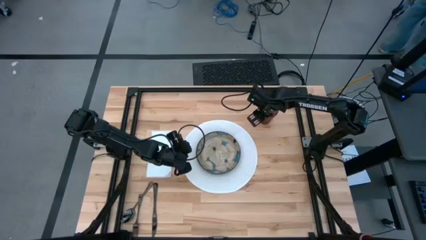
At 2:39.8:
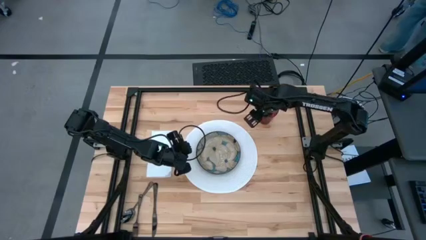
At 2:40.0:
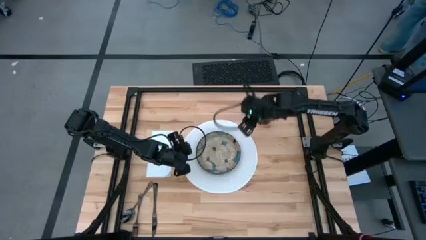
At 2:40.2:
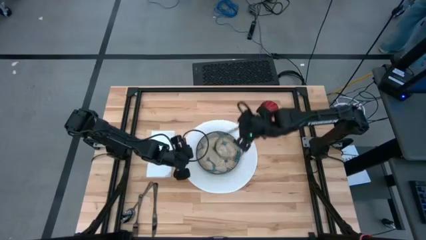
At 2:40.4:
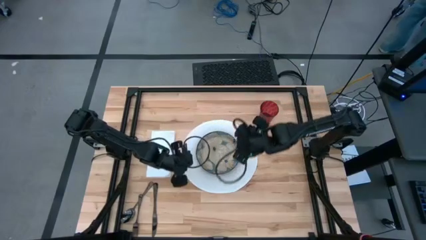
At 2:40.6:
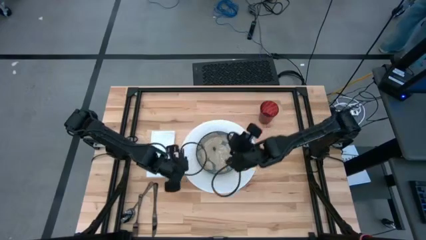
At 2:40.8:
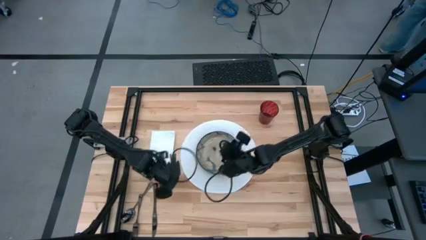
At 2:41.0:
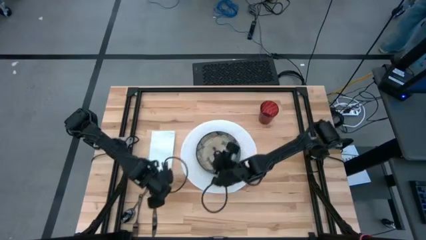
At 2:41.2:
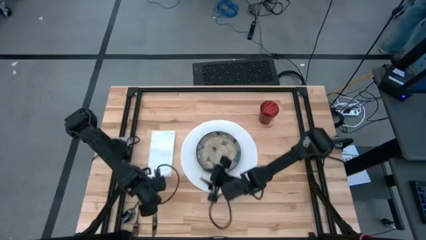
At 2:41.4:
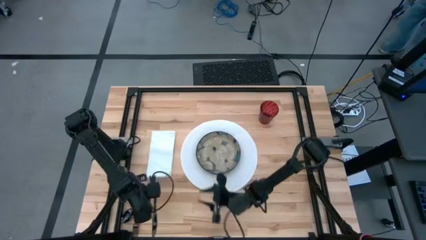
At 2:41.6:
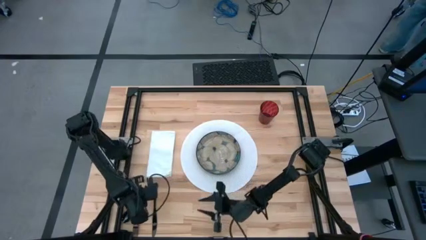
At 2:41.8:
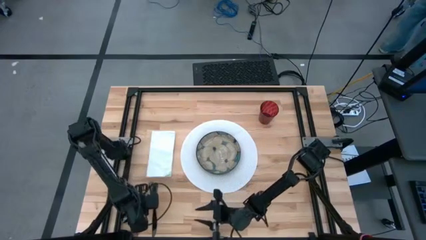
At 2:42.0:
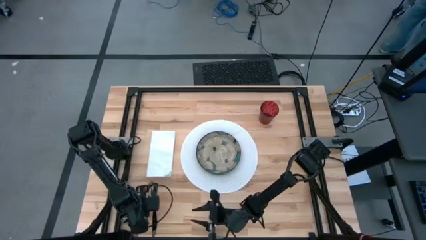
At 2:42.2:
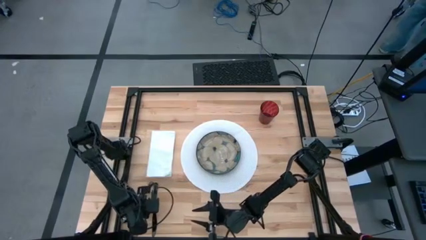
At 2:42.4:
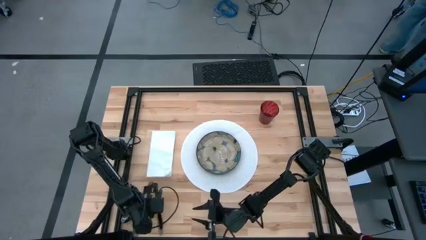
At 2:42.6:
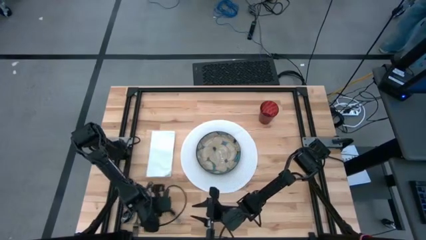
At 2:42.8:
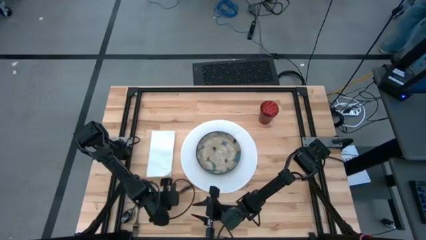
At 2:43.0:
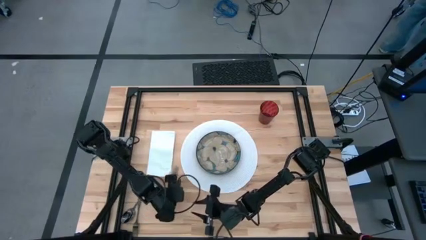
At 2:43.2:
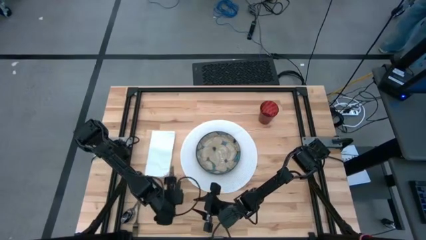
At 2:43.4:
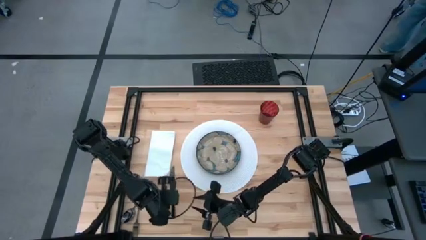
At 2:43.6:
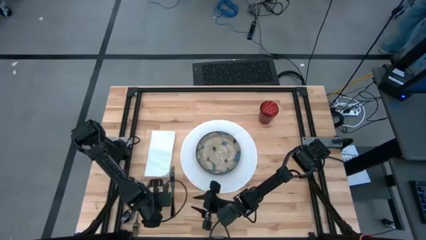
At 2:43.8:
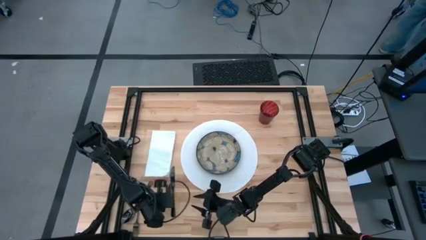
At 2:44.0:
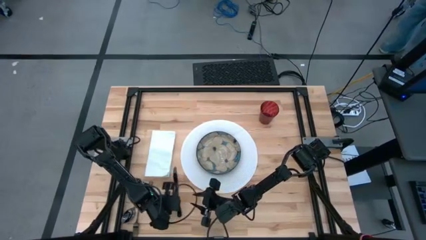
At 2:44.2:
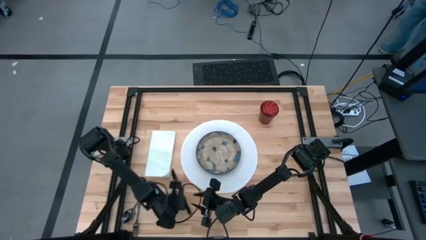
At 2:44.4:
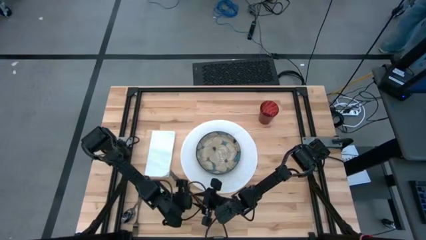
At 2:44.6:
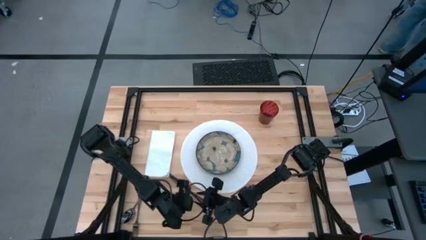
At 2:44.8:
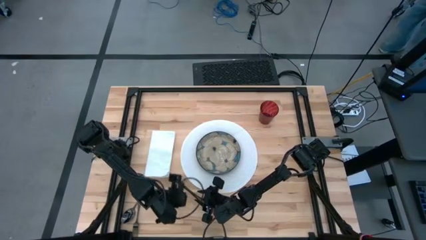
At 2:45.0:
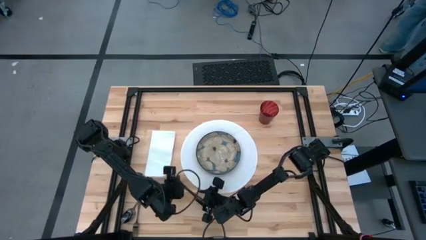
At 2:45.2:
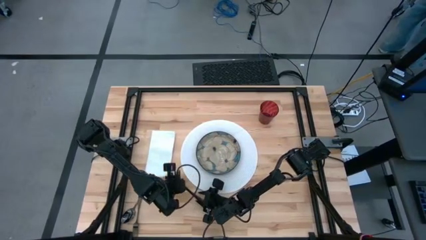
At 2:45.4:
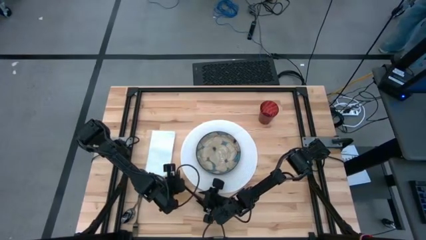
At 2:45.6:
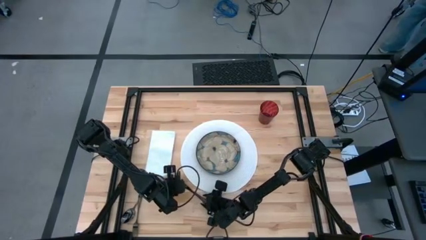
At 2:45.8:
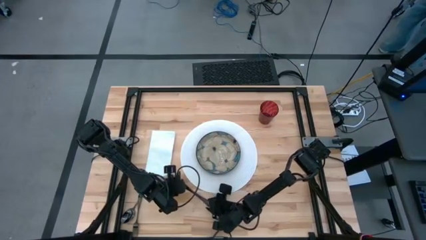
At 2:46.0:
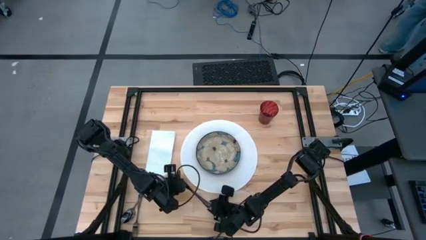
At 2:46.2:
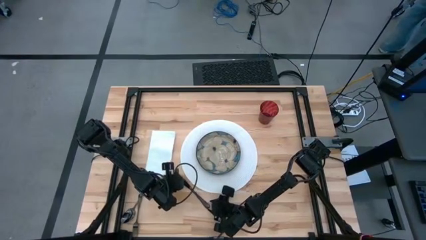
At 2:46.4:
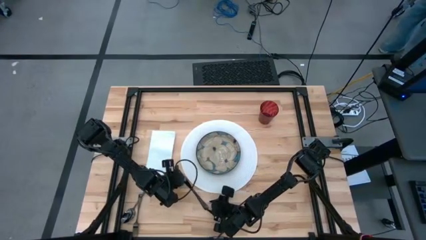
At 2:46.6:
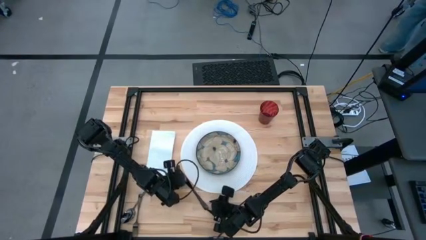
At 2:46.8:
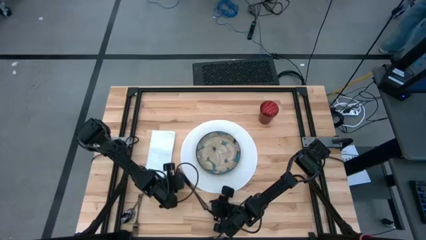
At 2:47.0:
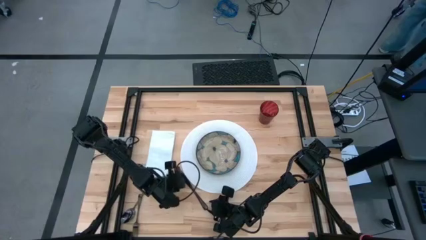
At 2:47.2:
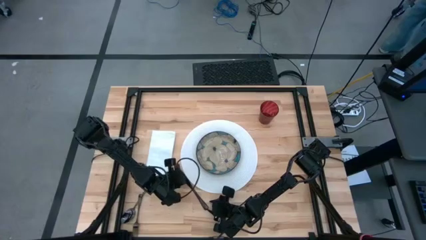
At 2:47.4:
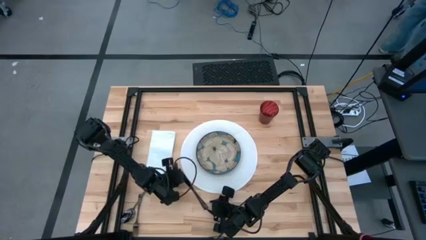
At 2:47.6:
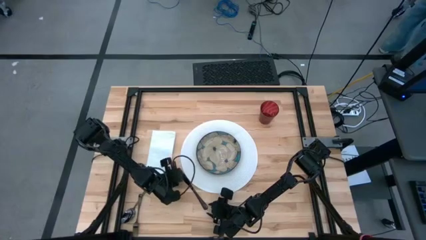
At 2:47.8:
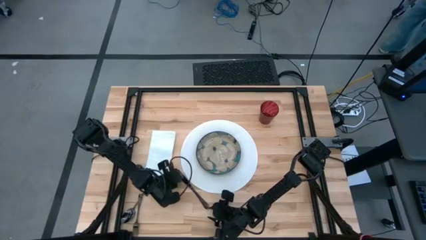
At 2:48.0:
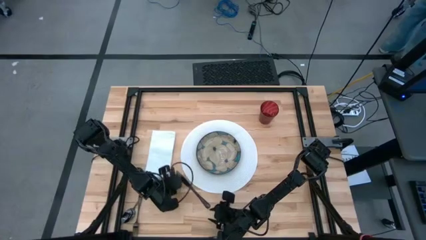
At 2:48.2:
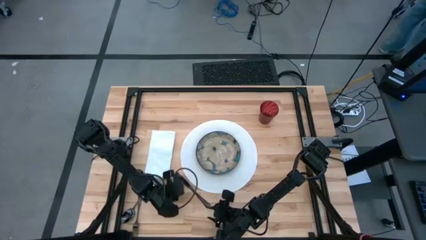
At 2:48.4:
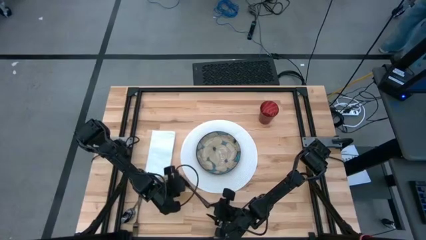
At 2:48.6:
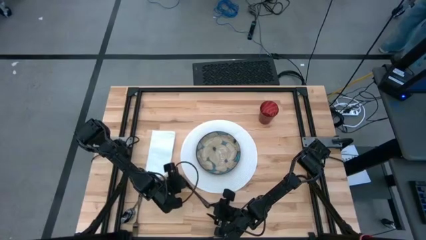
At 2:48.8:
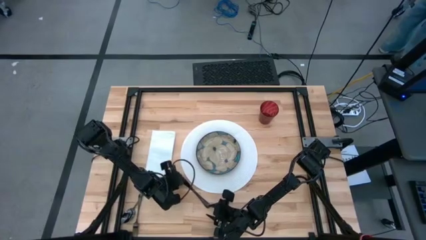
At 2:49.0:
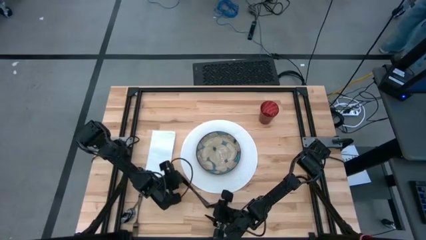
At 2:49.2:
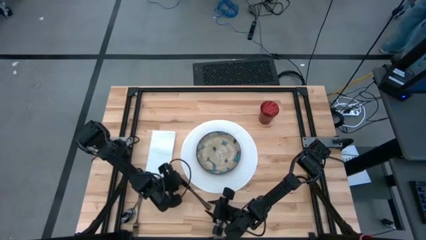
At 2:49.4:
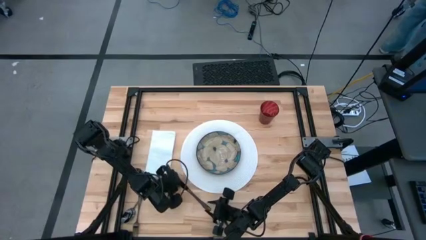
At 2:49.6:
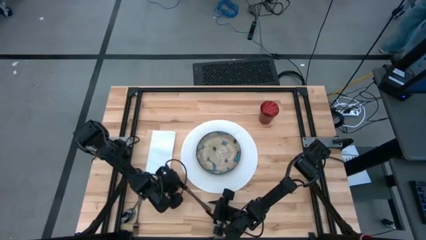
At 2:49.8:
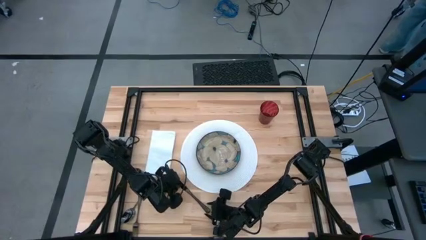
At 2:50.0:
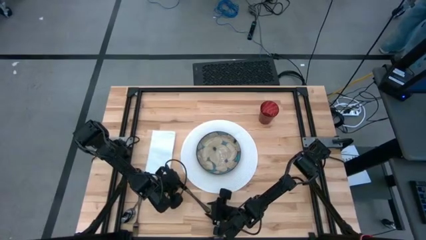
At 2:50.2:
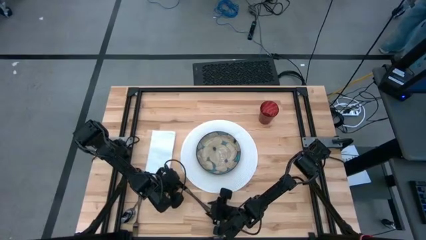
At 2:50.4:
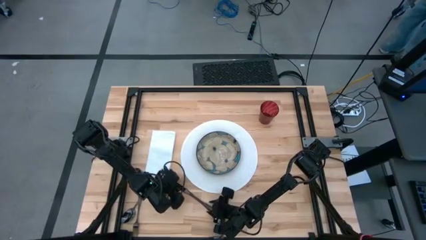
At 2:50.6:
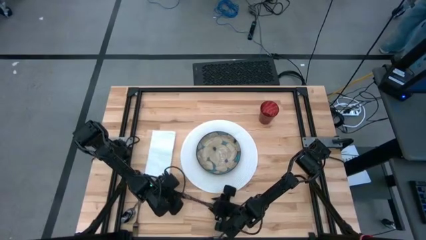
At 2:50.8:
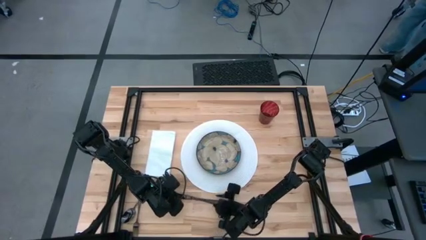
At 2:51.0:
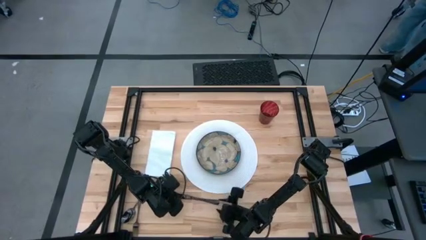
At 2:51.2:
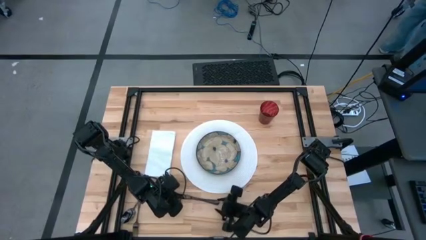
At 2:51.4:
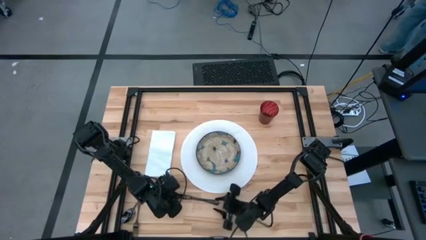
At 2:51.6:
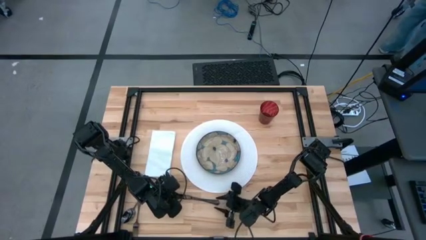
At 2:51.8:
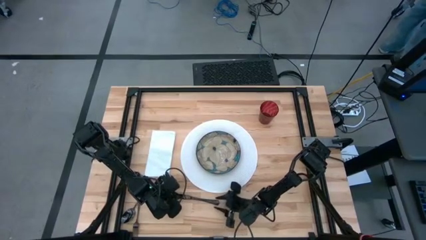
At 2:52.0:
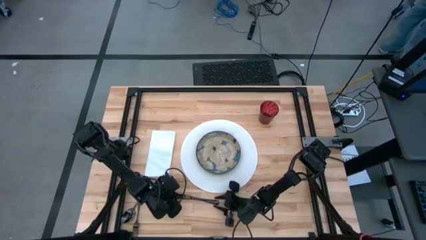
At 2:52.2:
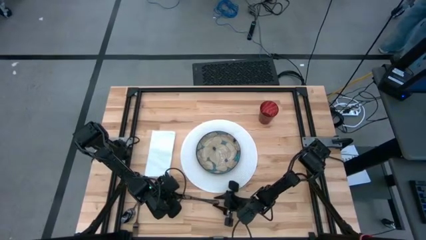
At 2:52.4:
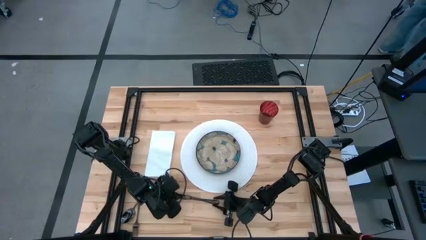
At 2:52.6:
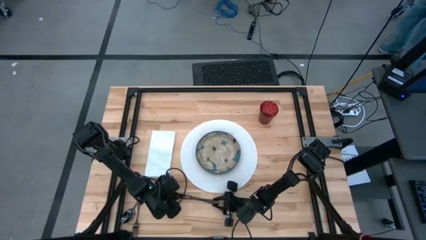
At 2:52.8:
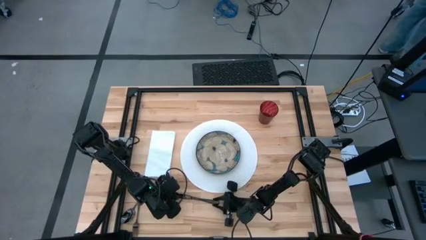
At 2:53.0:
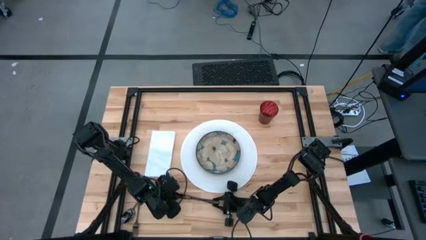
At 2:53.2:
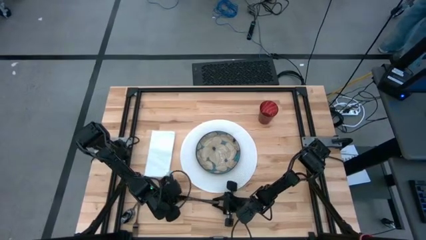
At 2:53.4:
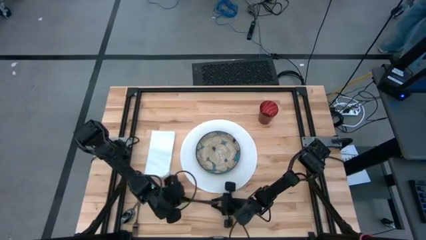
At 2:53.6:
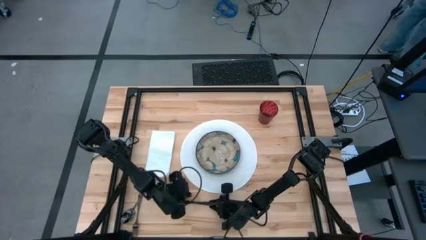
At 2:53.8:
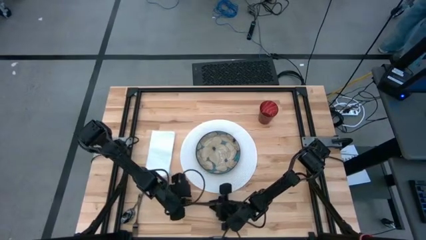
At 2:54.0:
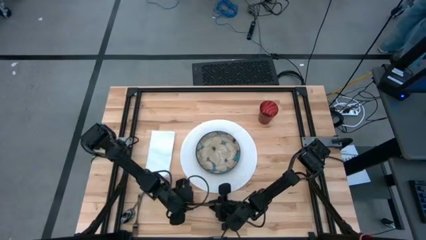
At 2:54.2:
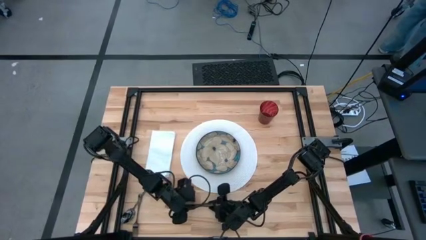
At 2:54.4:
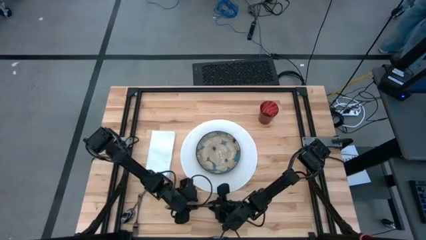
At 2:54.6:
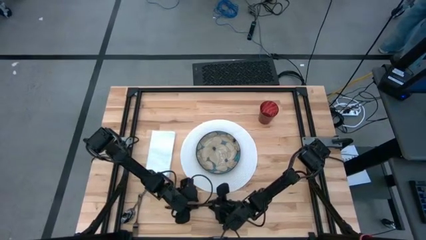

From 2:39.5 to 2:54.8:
Task: Set table place
Put the black knife to the right of the white placemat

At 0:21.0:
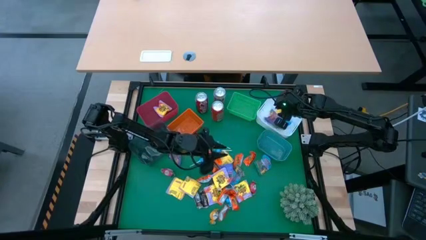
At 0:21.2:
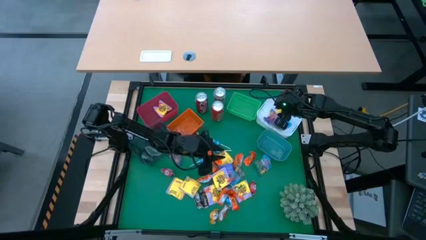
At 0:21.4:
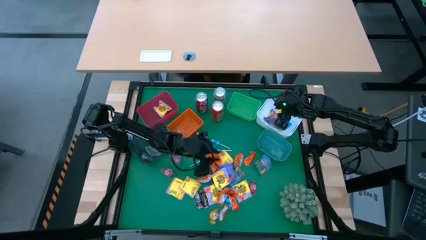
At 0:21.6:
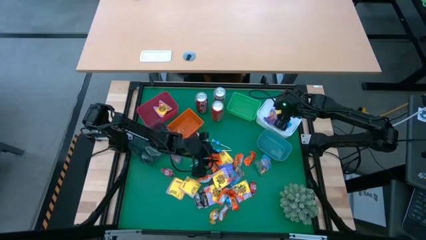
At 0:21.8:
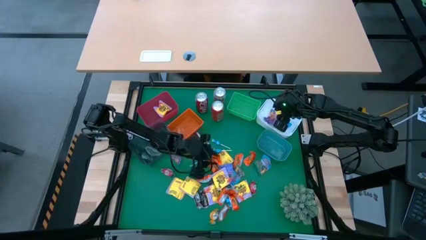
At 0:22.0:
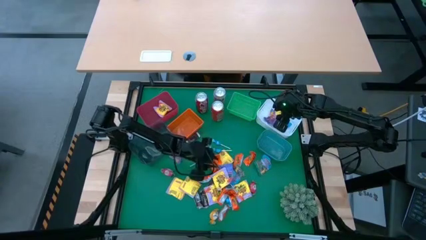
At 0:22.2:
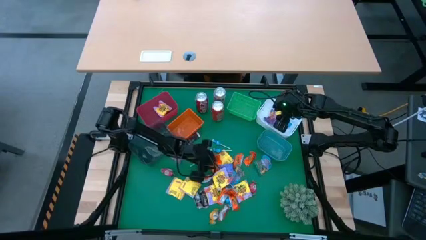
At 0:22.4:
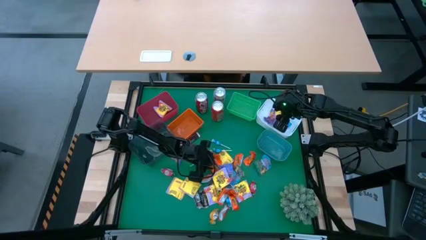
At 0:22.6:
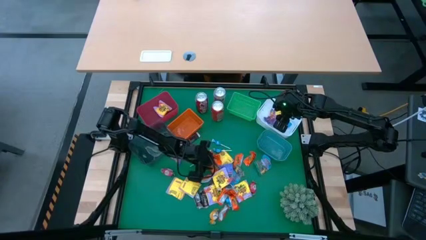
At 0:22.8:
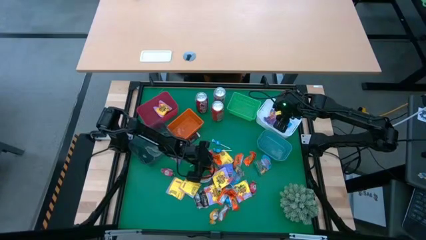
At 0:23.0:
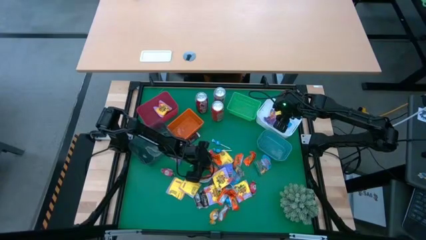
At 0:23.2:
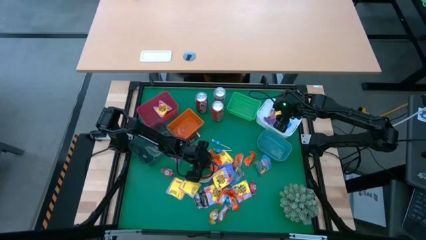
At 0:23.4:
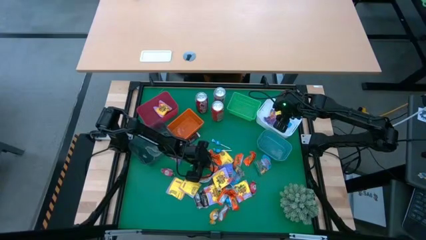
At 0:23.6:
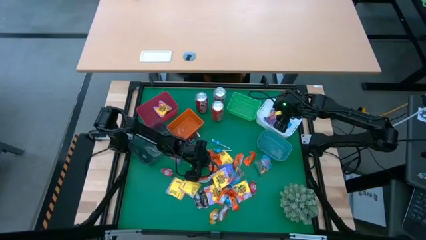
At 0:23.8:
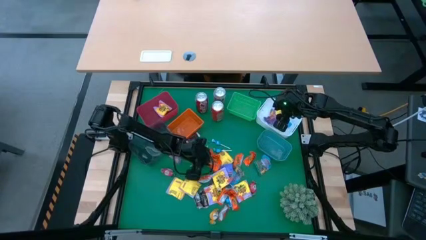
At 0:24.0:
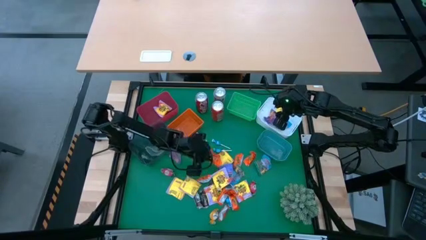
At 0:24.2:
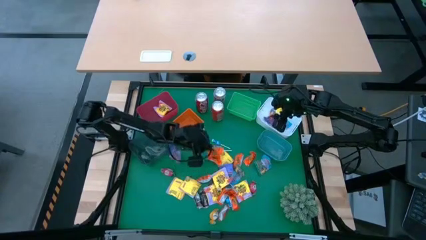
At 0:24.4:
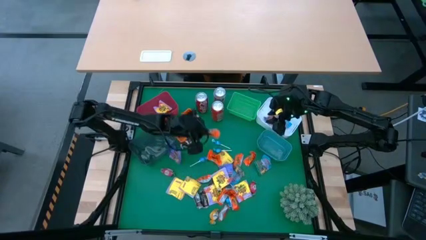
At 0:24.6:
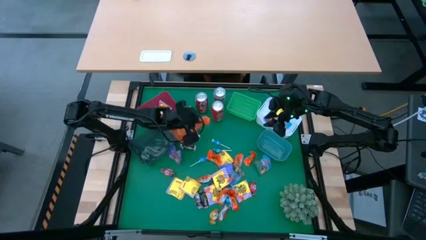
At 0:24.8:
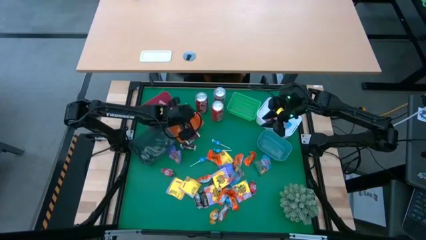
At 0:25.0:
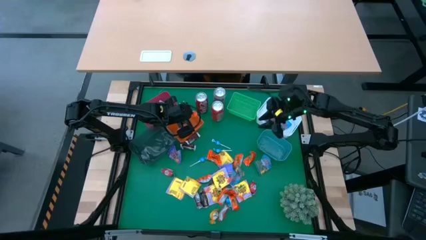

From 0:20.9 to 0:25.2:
Task: Sort candy
Put the orange chocolate into the orange bin
